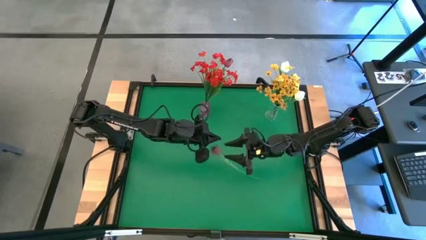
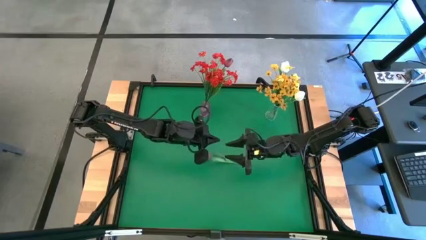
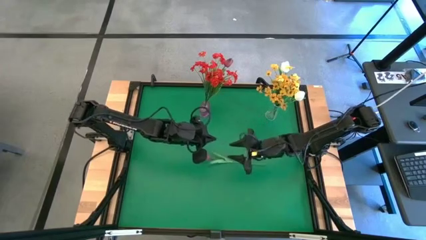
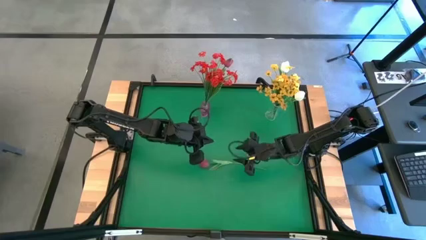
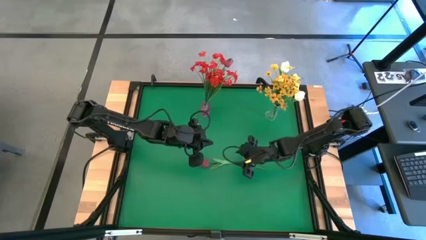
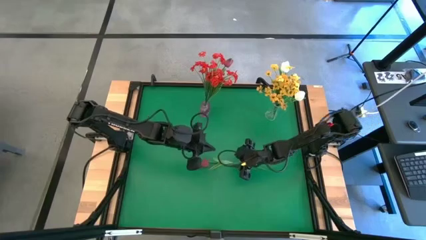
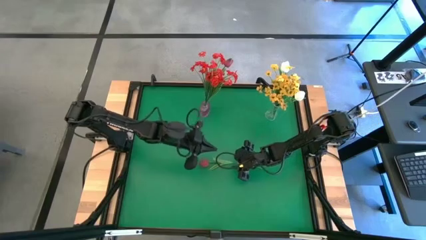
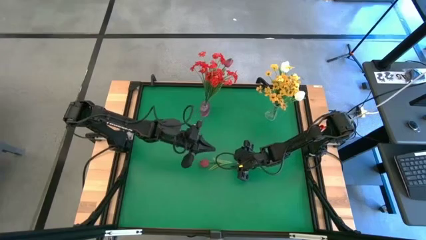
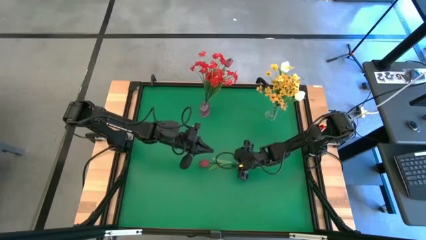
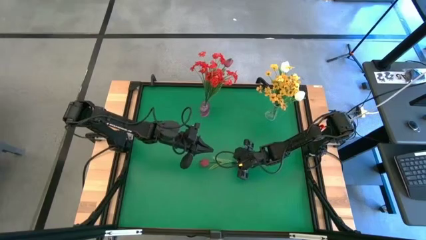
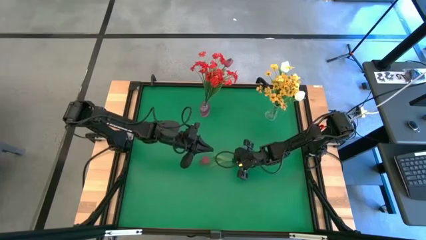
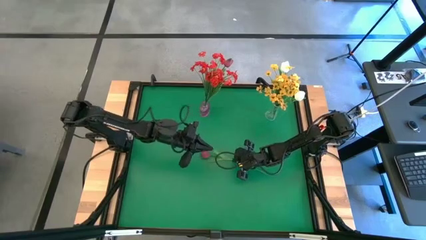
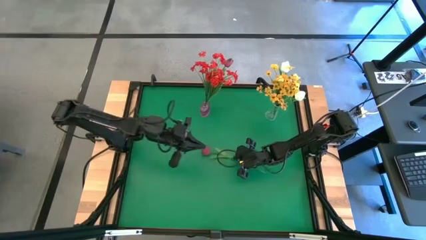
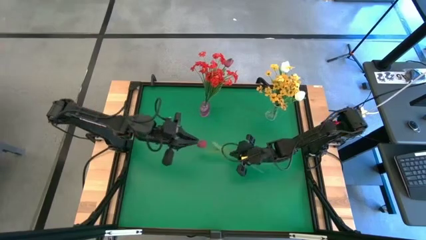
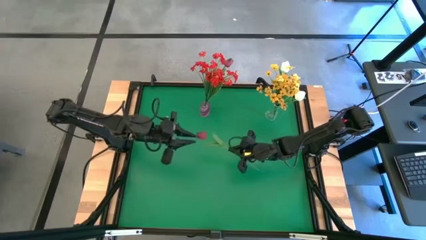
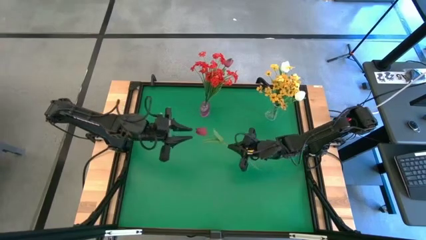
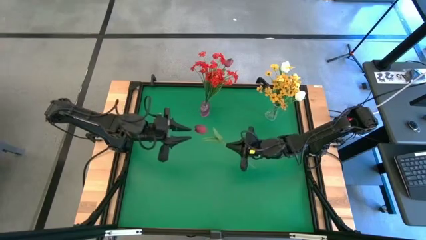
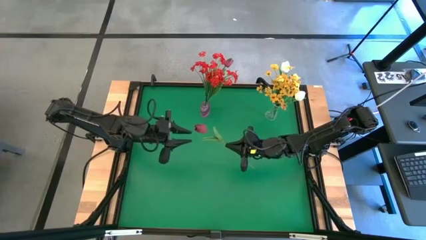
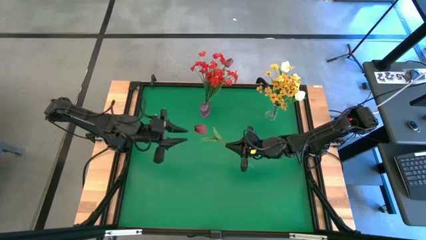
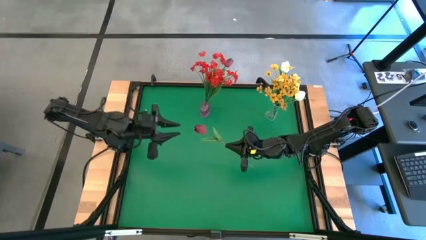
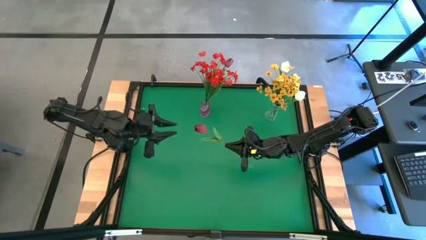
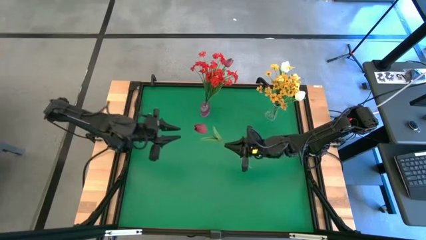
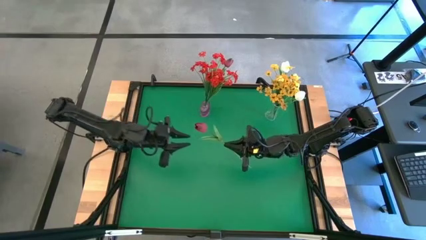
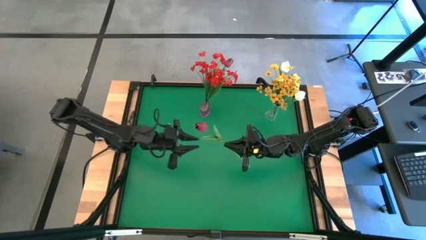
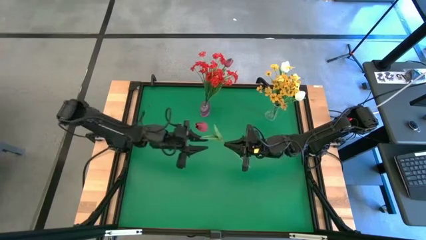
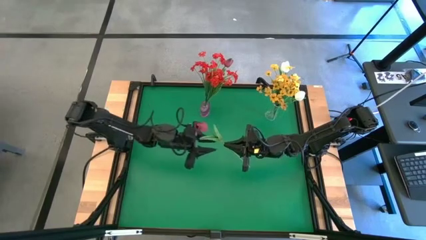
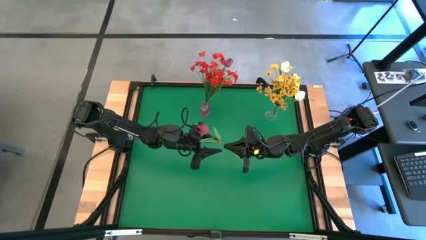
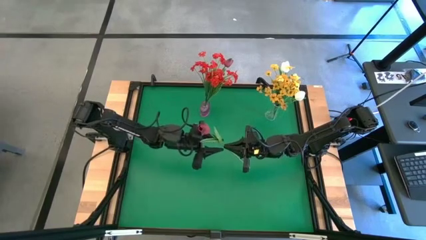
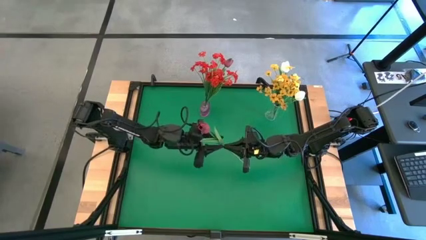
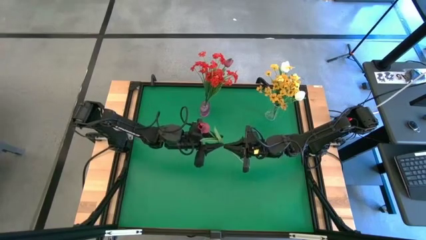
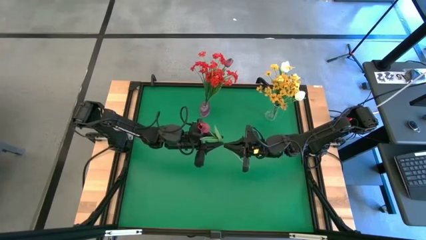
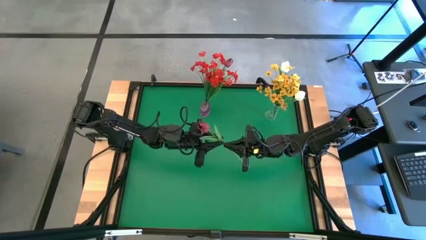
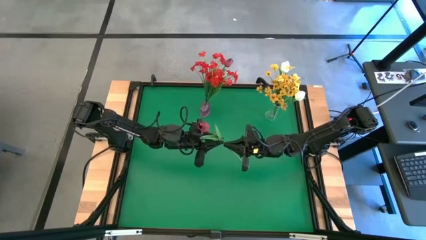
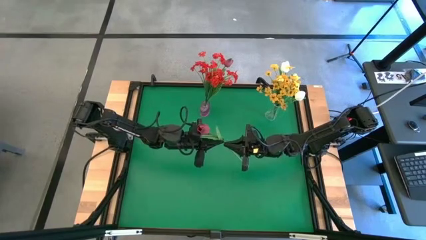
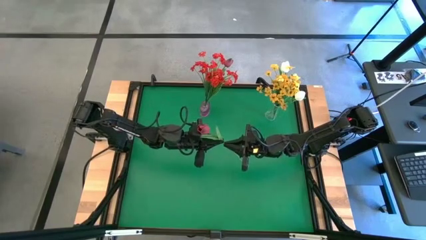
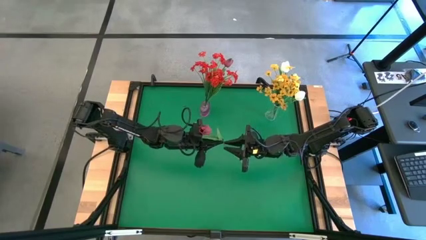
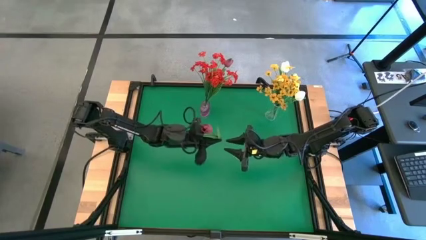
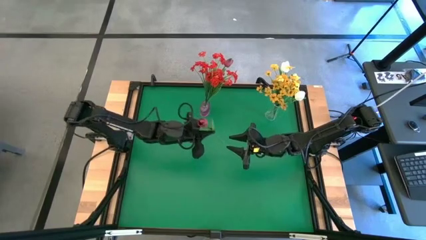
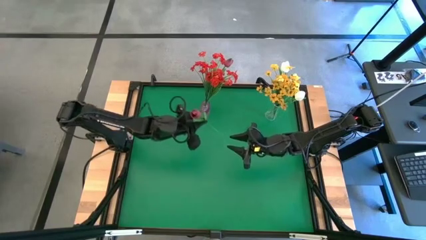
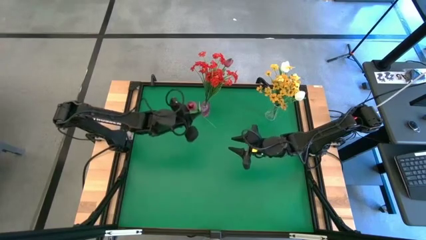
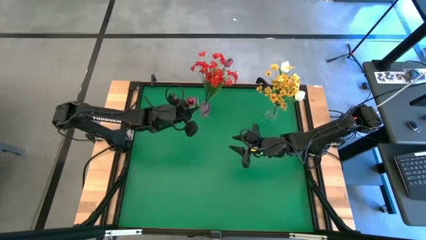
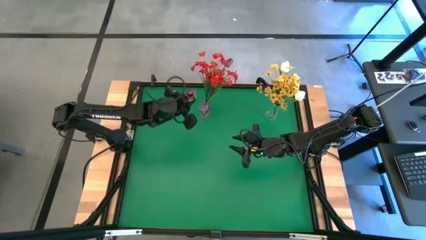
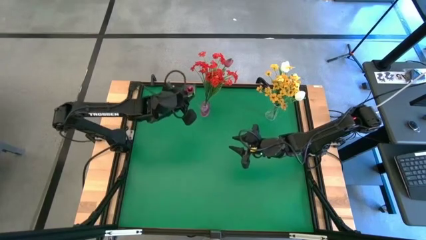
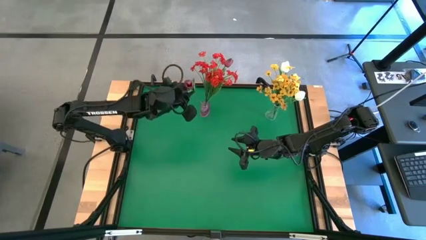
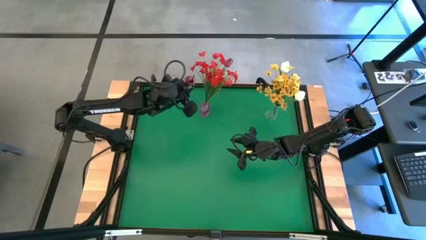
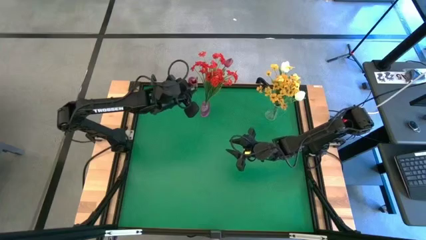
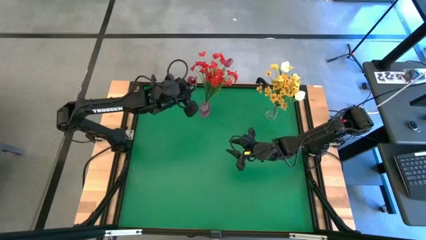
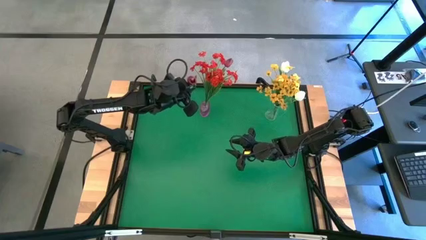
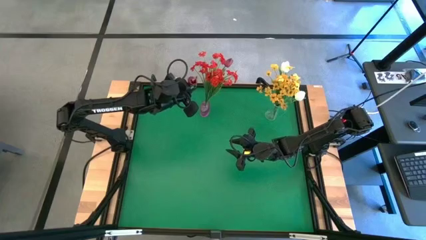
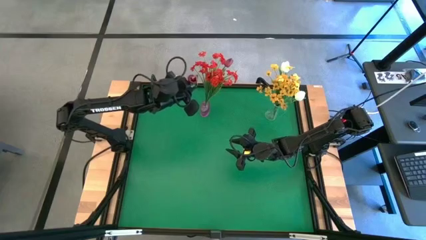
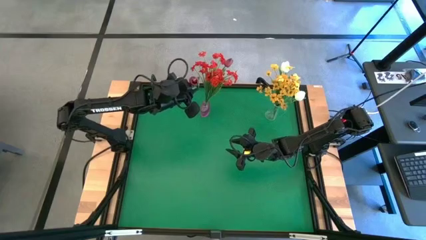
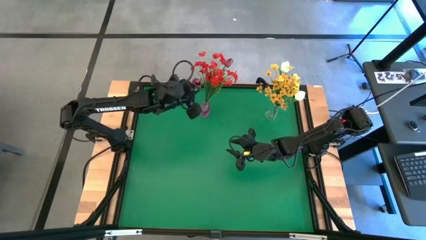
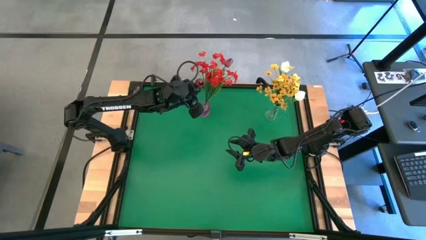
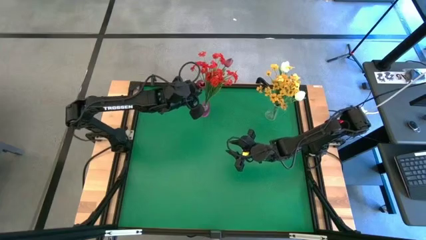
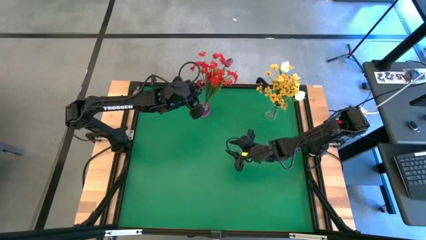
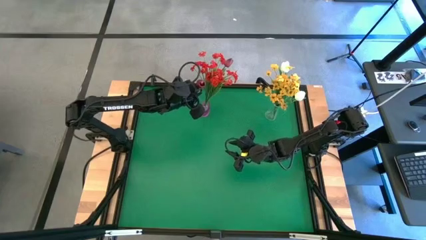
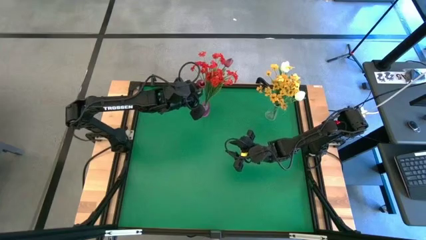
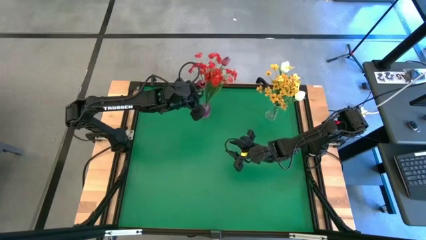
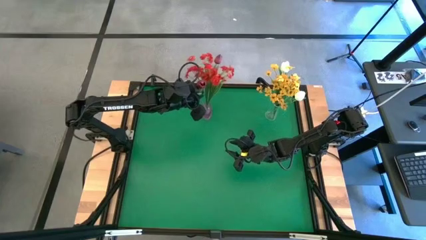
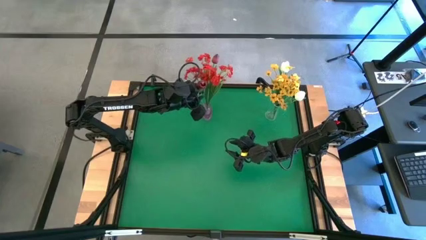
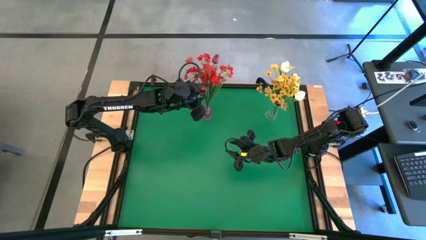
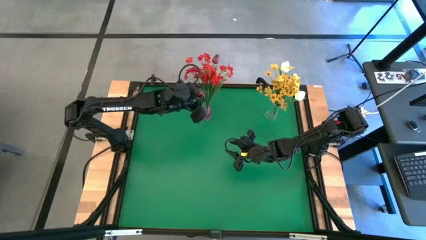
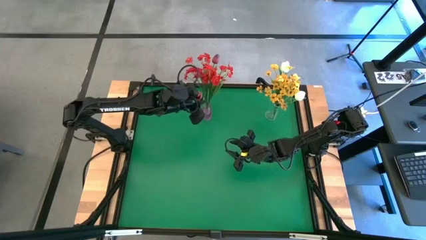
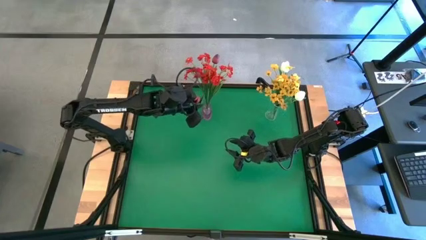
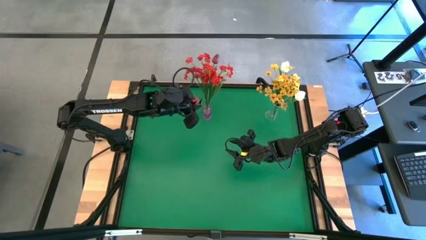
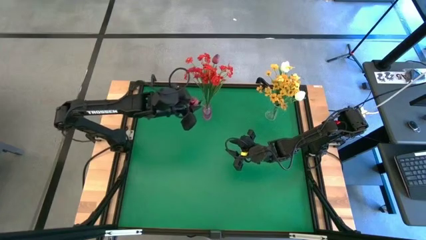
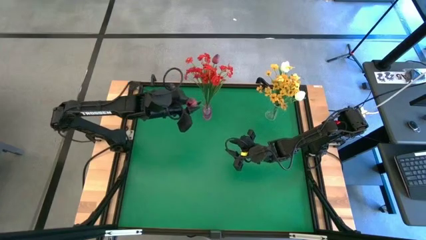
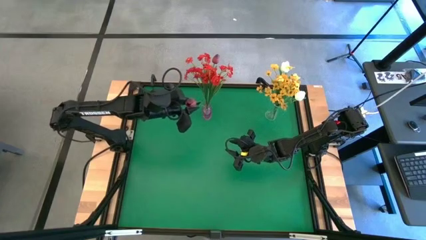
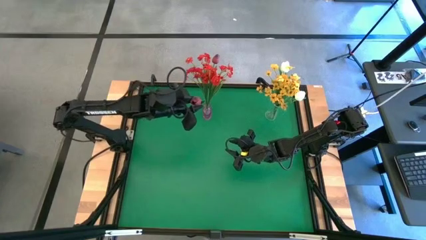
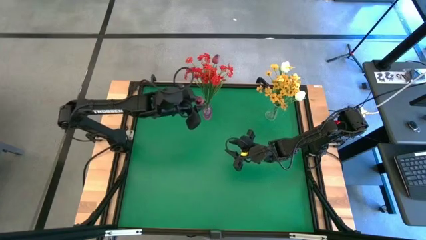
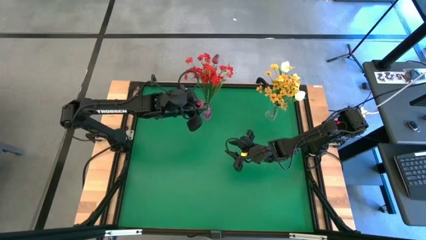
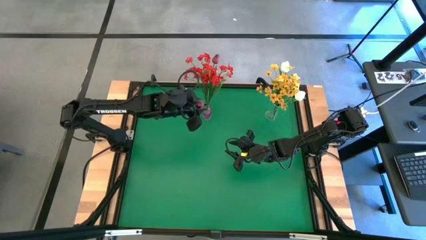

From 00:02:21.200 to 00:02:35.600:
Task: Sort flowers into vase by color
Put the red flower into the pink transparent vase

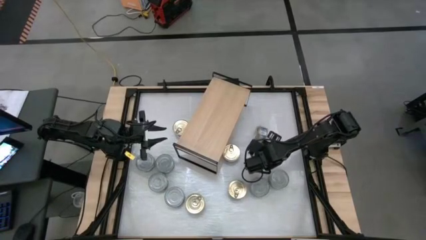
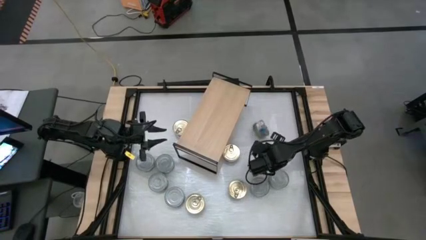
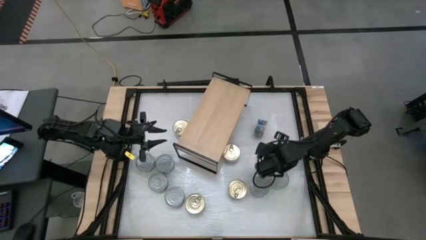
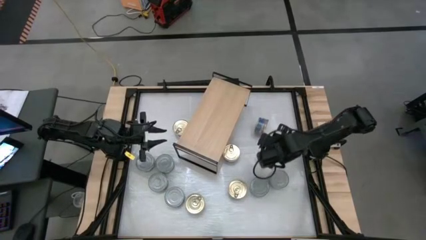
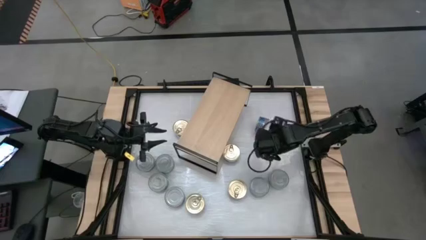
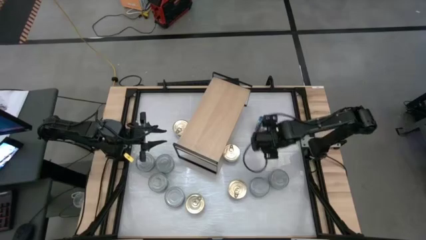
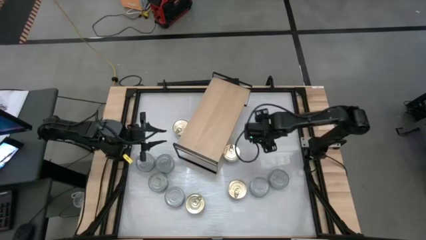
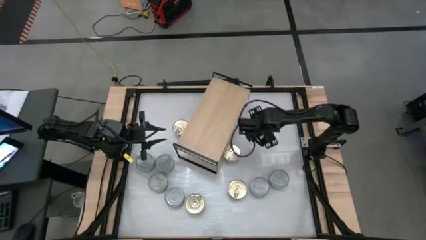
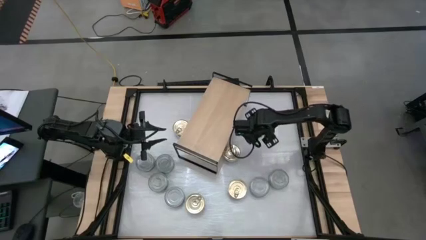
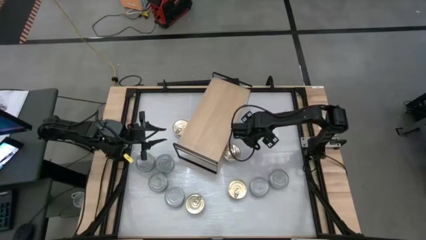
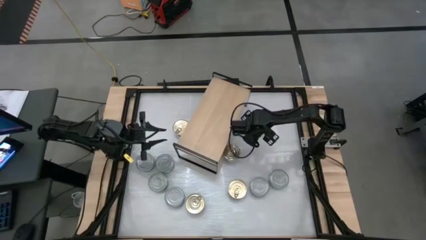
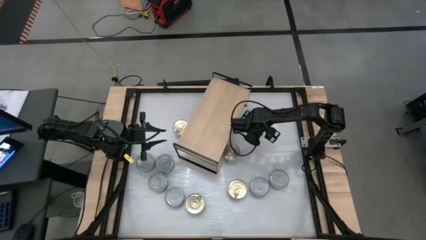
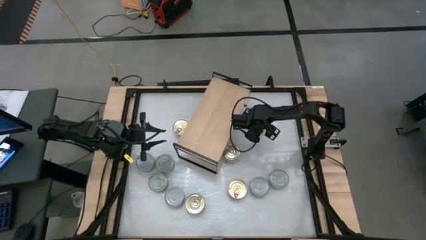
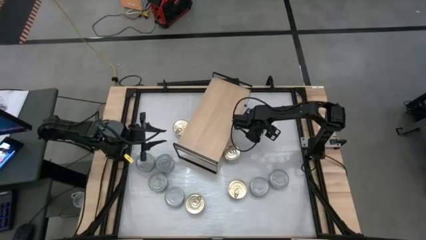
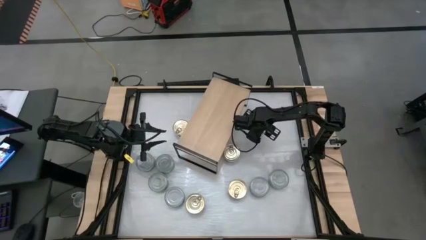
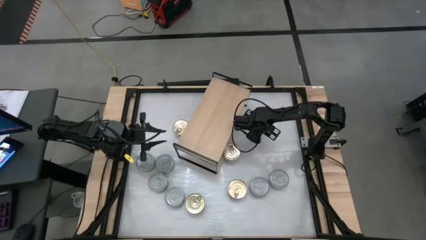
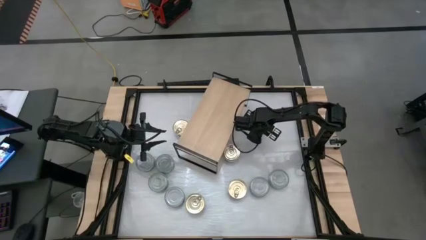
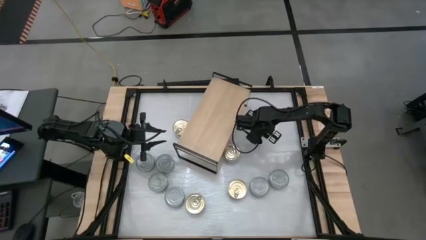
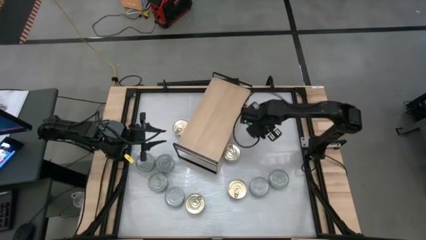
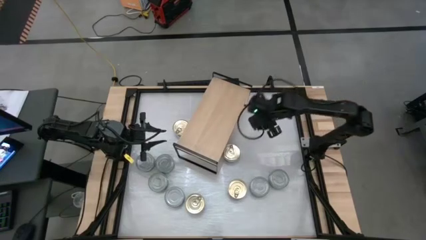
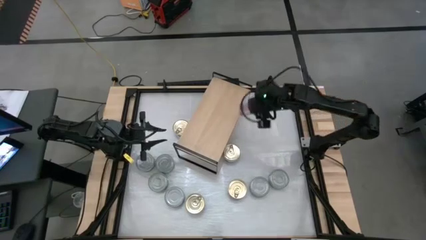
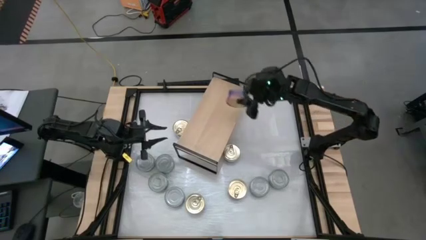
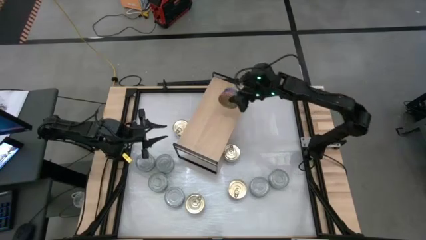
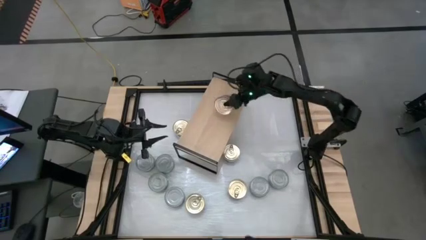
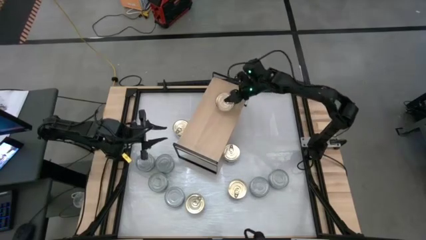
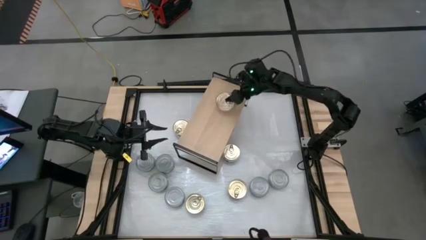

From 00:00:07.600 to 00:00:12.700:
Task: Stack canned seafood by type on shelf
Put the blue tuna on the shelf
